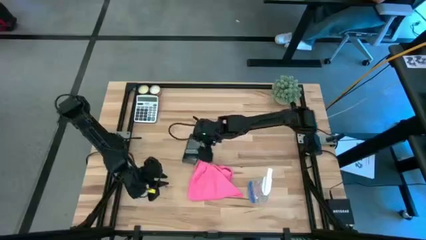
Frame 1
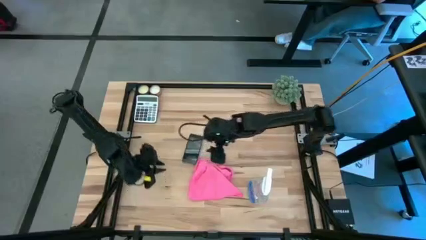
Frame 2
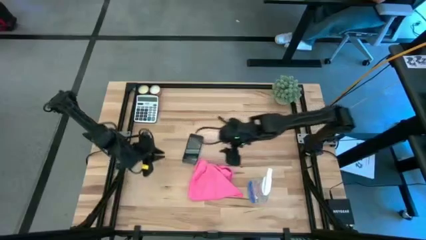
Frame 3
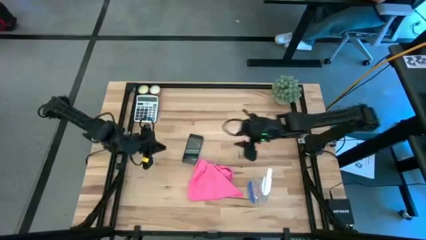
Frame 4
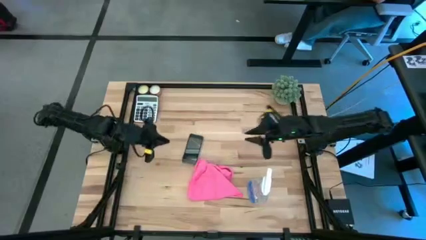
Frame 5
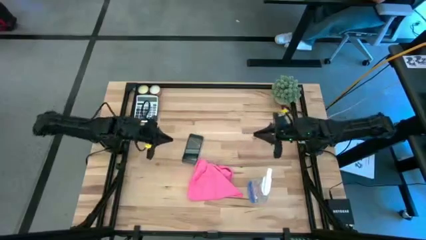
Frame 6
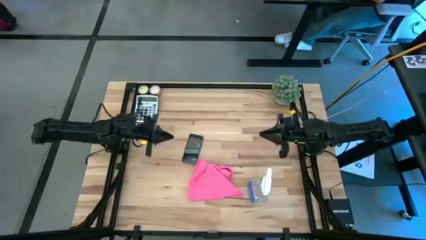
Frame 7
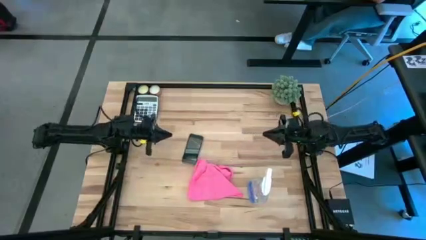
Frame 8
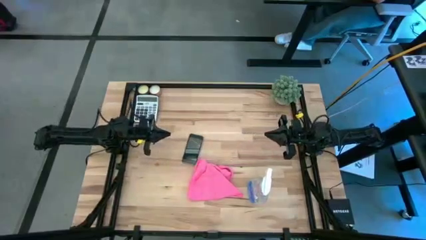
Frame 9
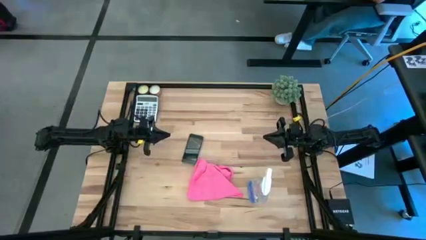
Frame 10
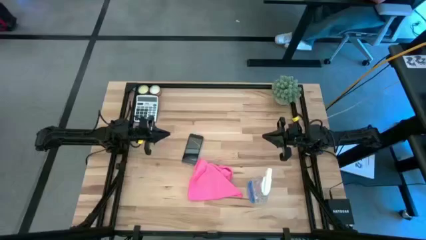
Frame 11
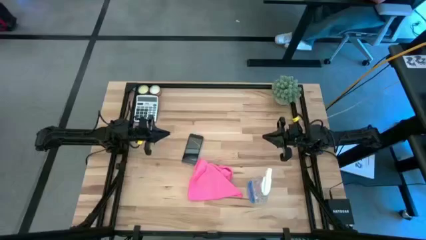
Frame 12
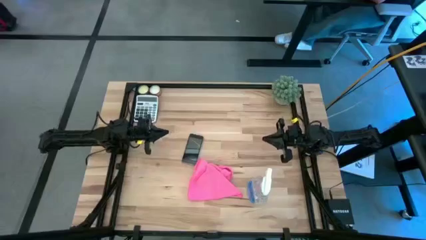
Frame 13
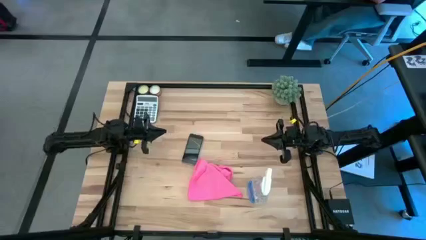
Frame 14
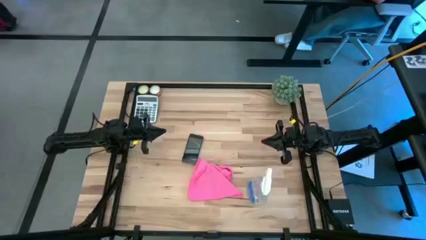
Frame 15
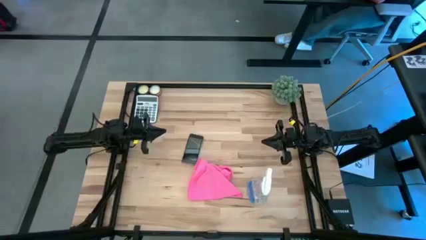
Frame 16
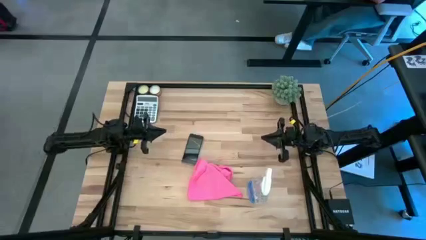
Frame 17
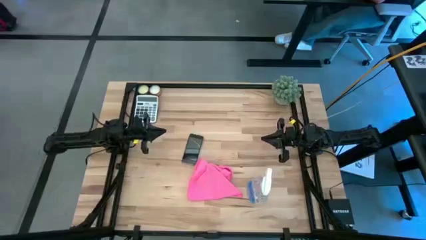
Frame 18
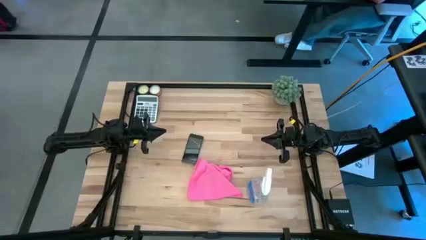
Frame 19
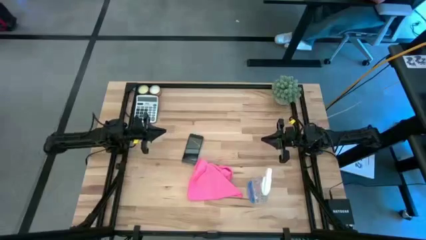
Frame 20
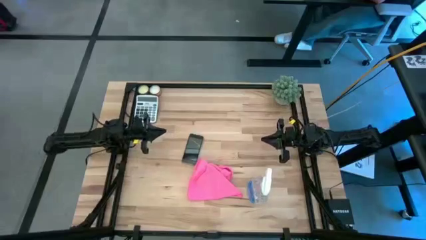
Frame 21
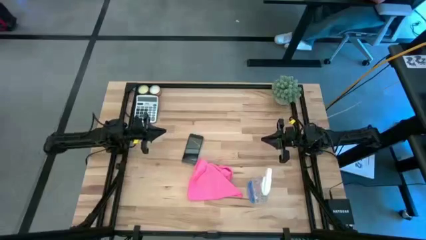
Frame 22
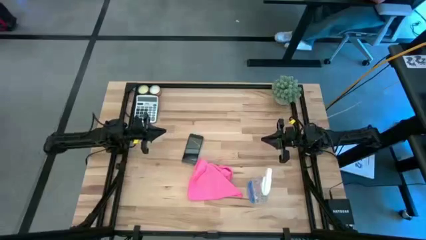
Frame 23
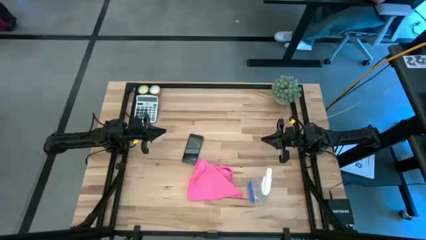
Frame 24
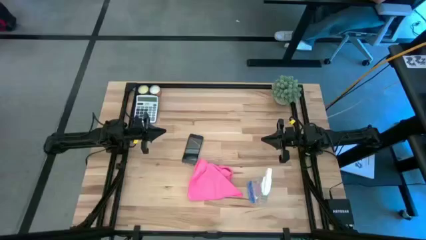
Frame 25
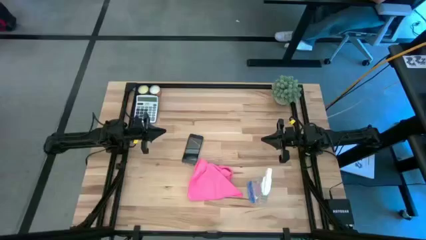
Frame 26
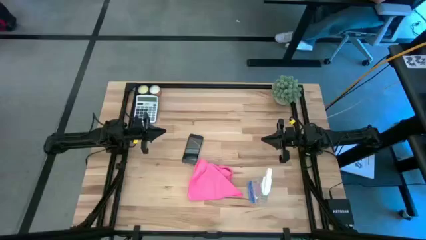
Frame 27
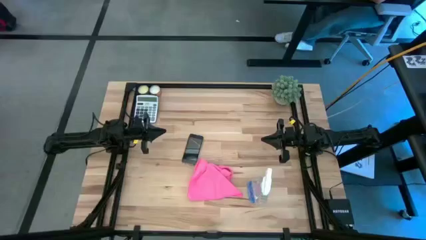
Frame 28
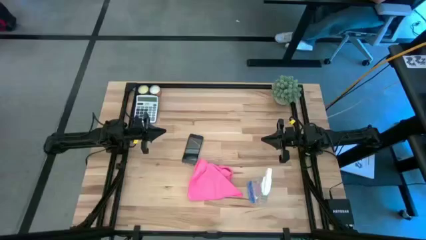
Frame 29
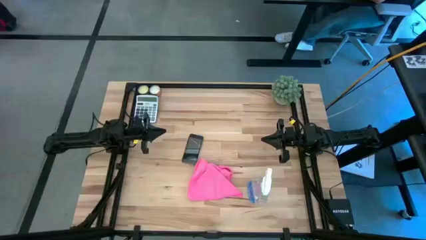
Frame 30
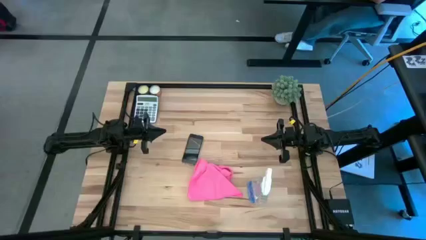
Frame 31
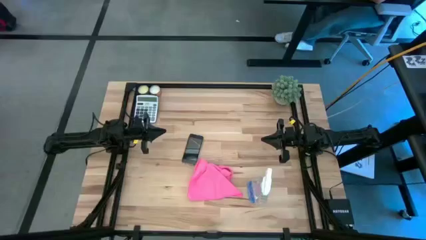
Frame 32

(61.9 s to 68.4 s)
Task: Apply microfiber cloth
Return to Home Position

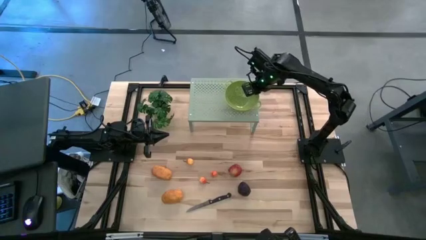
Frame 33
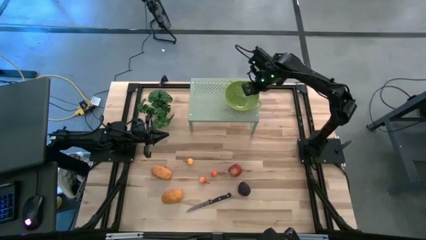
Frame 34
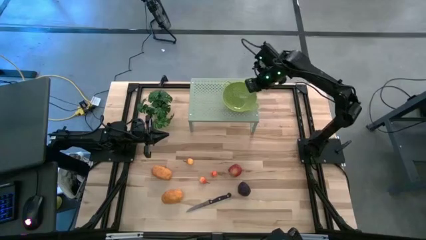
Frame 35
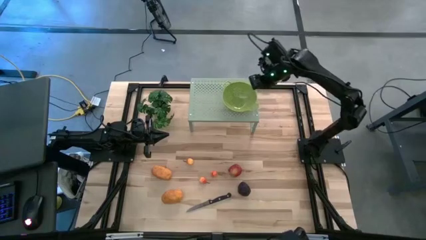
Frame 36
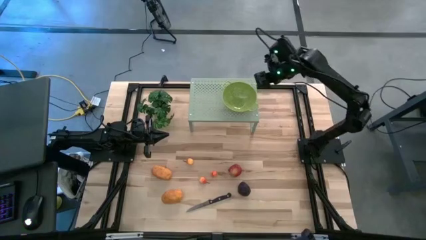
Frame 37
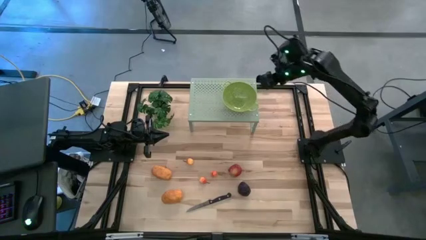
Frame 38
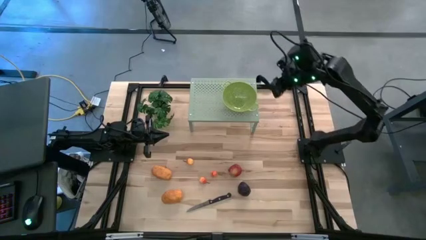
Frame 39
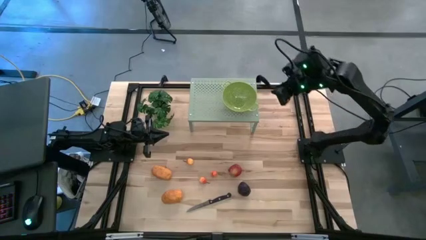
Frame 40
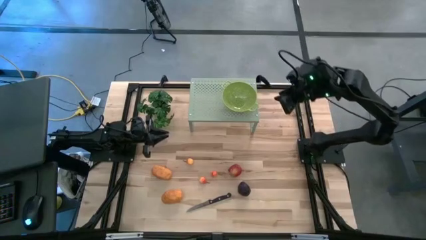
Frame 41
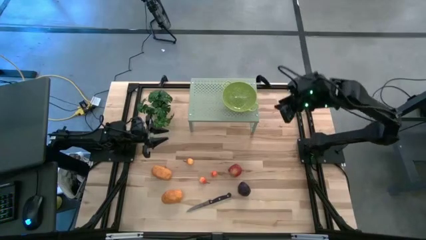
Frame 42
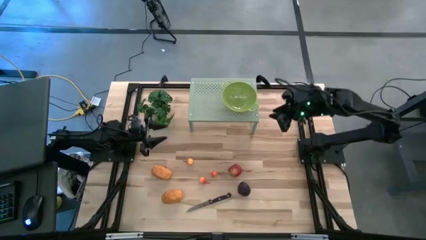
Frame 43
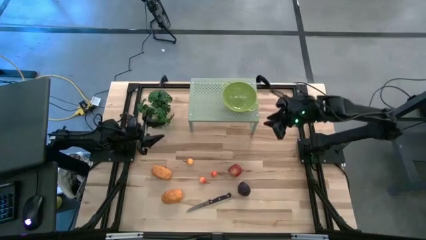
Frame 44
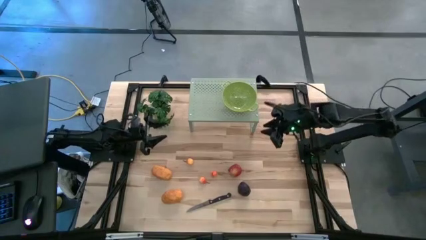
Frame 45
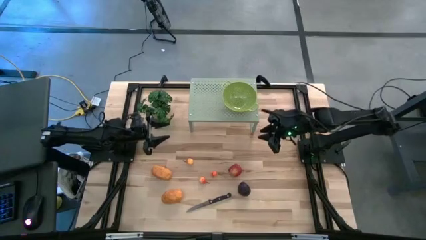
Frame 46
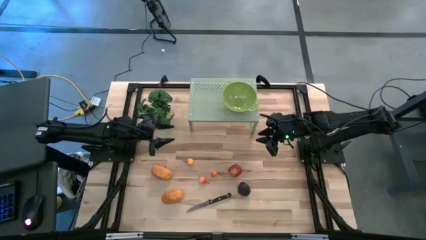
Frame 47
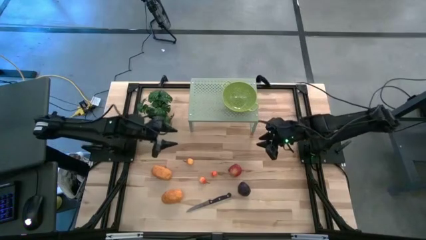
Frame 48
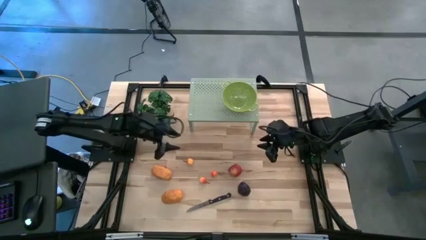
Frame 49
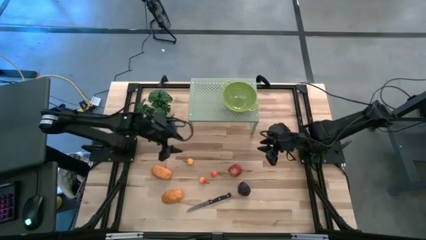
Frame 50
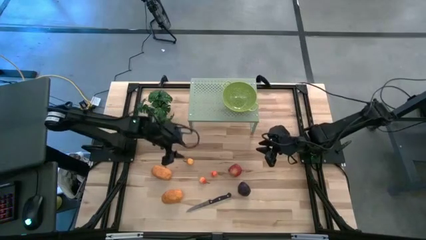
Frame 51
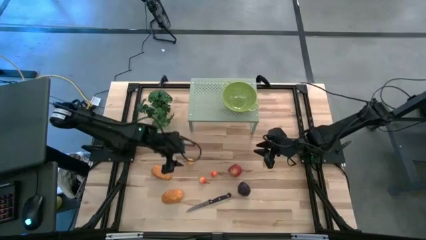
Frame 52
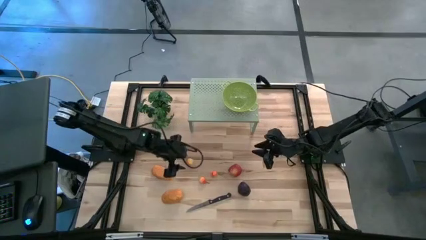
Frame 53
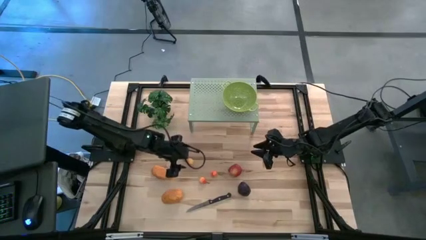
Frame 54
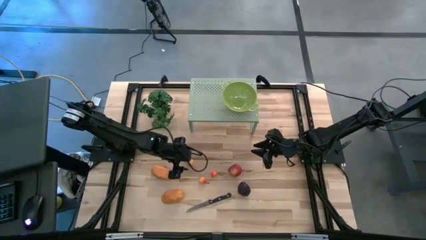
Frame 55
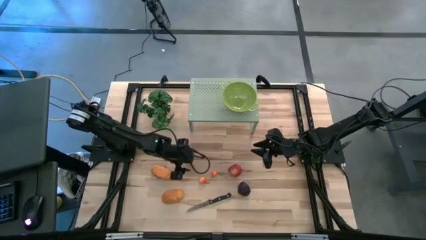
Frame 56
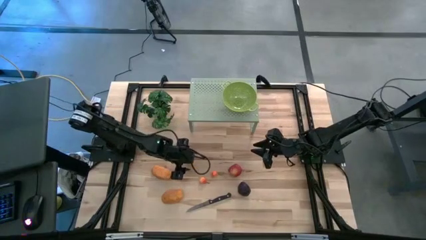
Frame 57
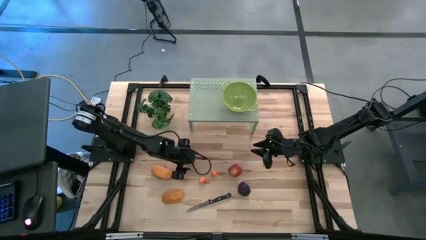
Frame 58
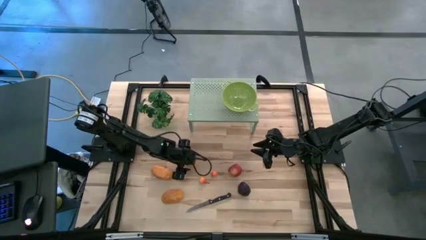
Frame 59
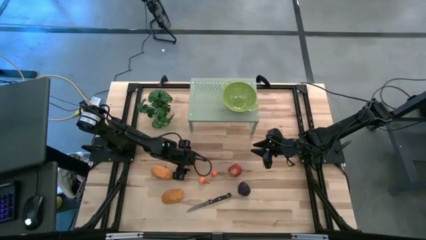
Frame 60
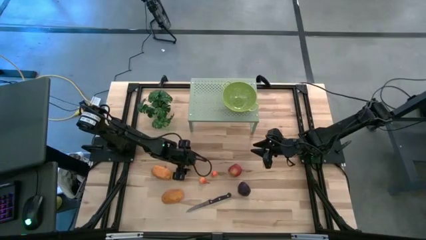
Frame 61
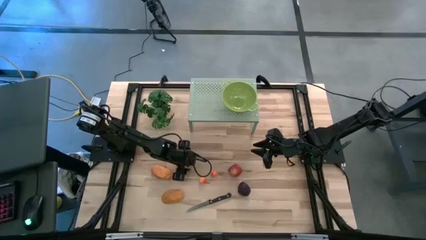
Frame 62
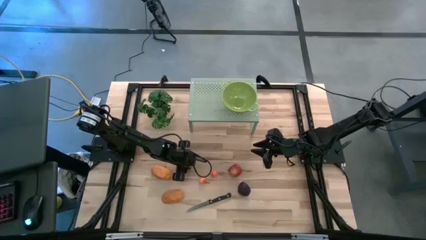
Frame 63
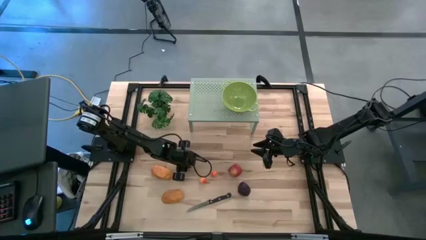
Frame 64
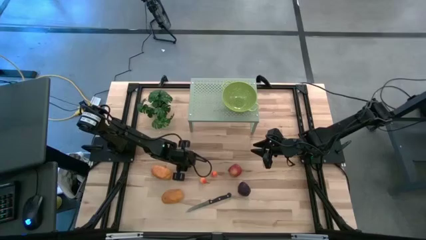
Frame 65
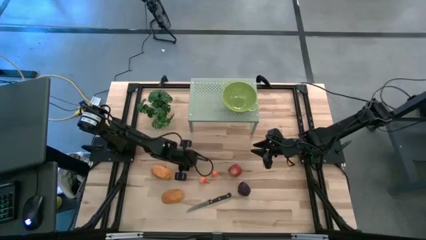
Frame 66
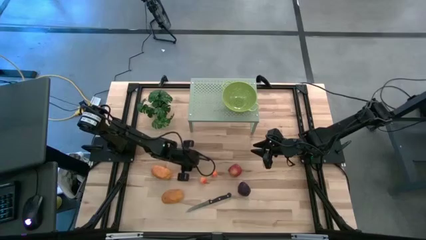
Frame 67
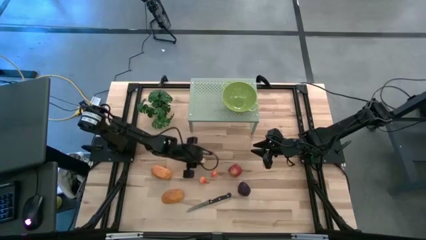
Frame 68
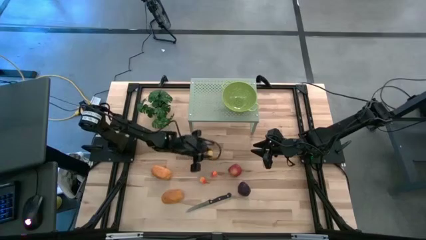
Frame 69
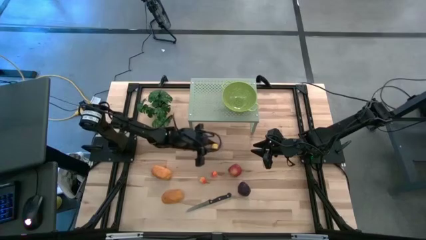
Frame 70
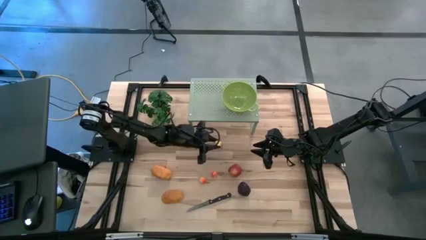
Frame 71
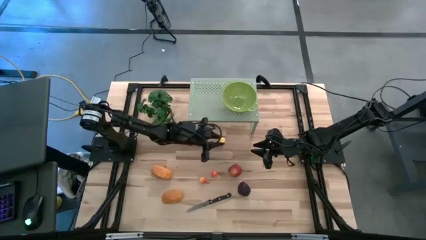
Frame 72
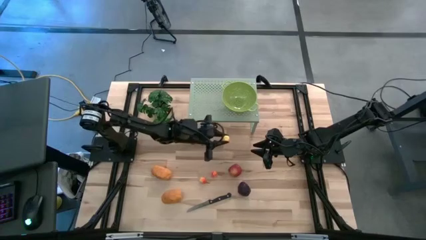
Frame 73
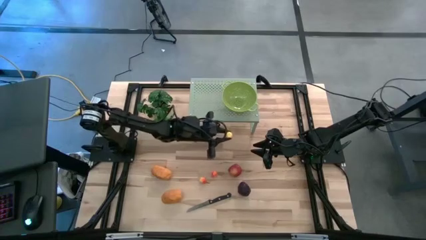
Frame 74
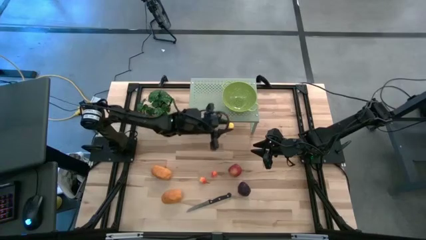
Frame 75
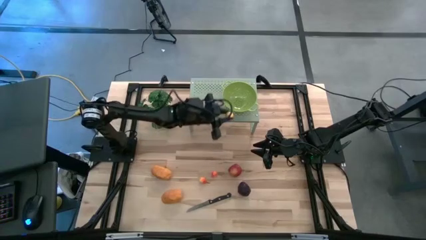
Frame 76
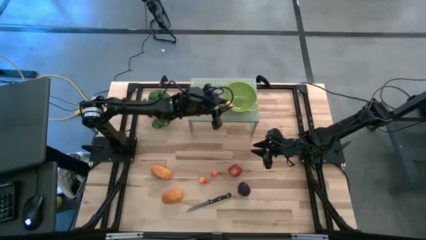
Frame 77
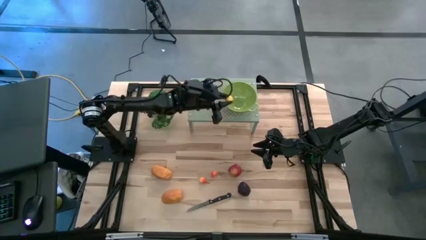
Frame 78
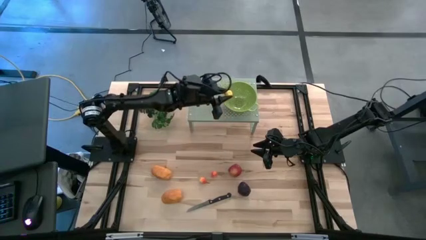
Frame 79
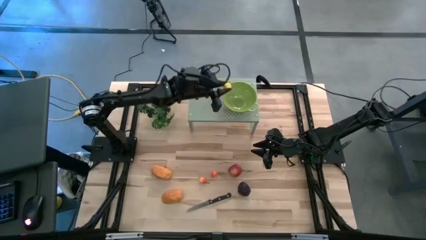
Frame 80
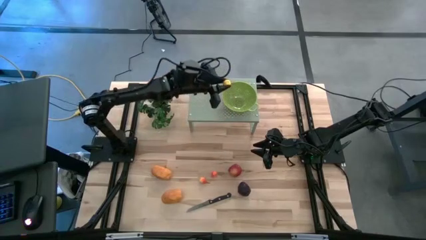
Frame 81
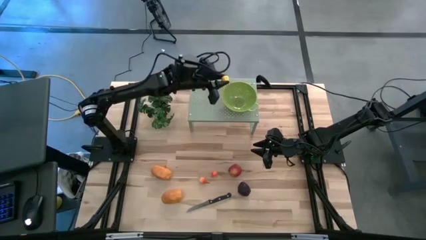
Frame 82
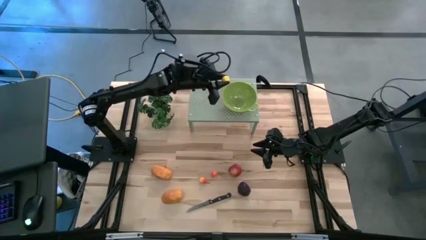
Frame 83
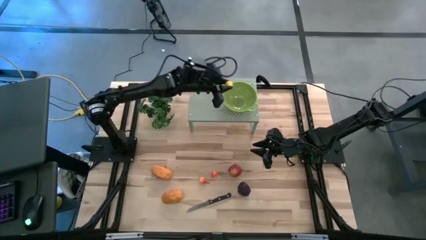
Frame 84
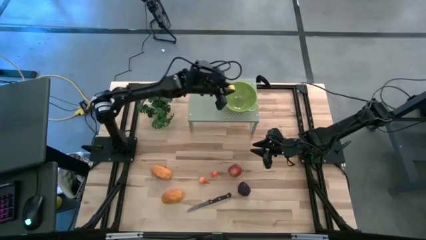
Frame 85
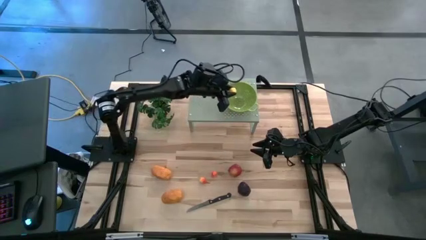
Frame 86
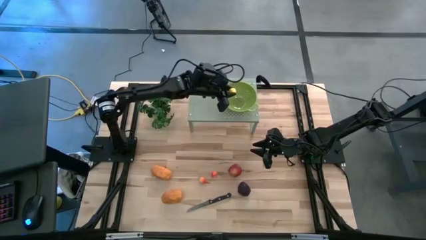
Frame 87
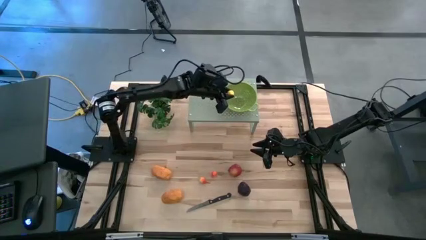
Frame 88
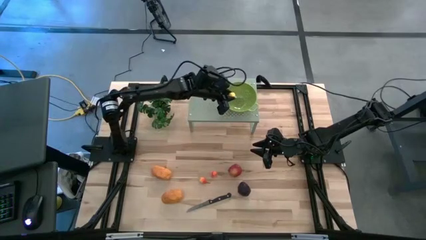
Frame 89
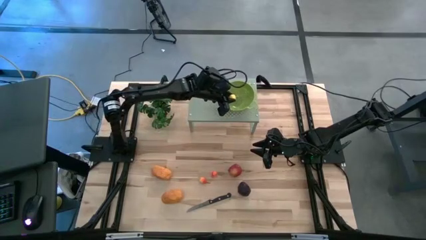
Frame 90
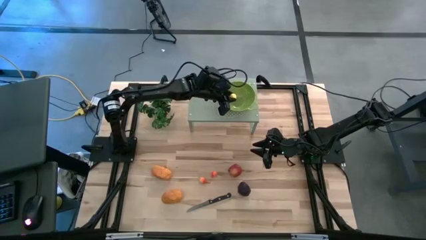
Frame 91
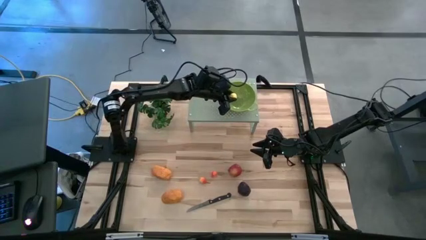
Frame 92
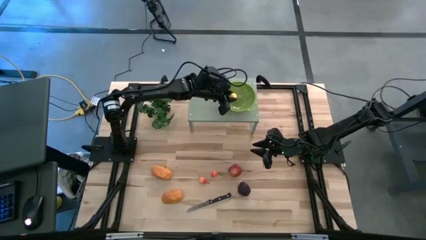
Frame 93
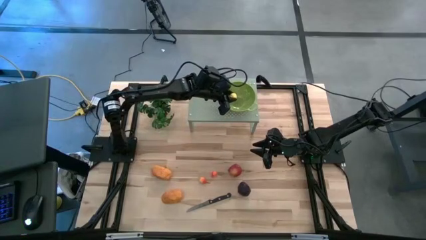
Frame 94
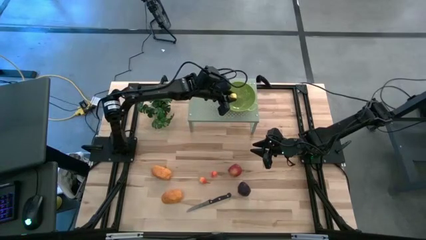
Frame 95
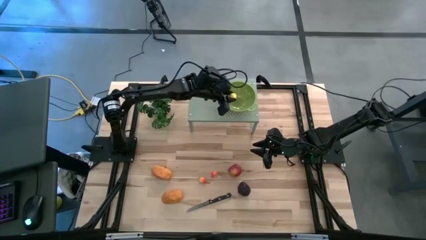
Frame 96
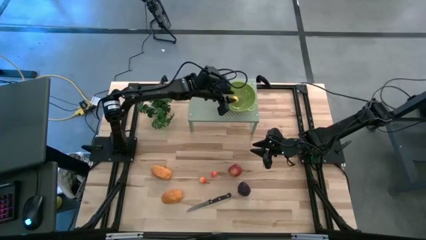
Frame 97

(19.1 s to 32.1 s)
Task: Pick & Place Fruit
Put the left peach into the strainer bowl on the shelf
